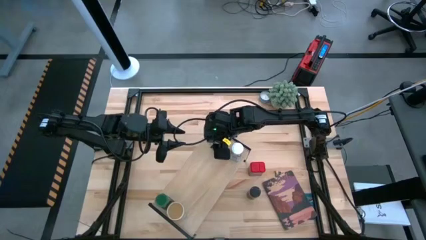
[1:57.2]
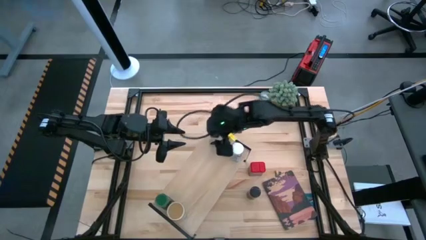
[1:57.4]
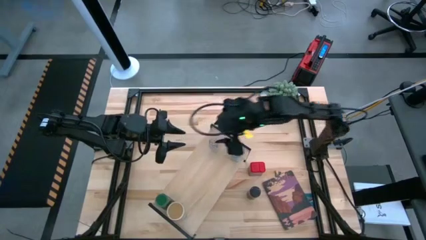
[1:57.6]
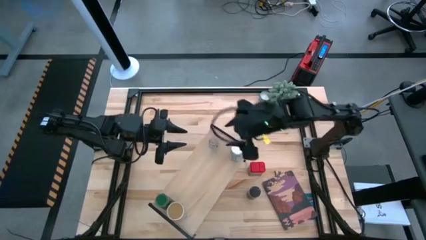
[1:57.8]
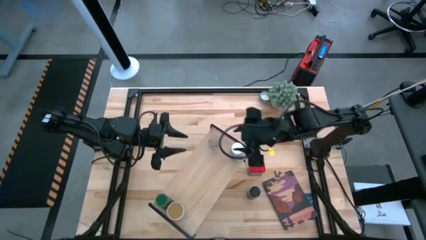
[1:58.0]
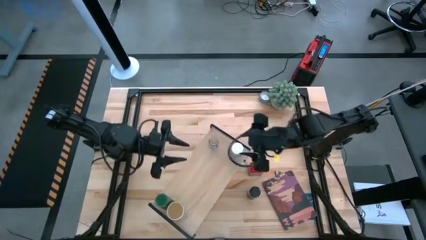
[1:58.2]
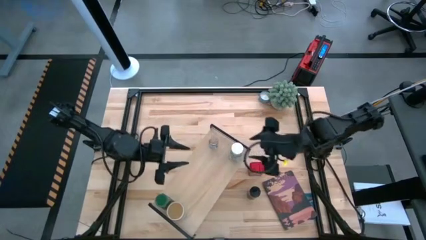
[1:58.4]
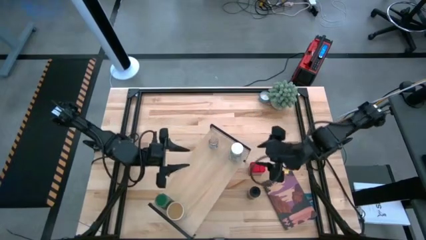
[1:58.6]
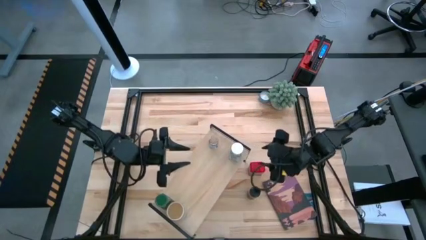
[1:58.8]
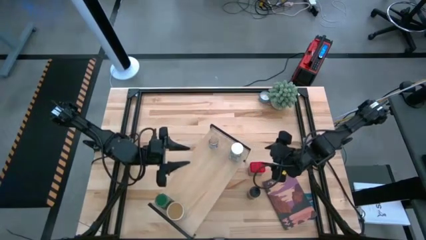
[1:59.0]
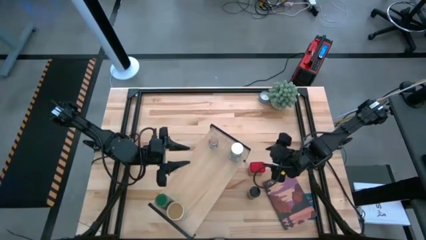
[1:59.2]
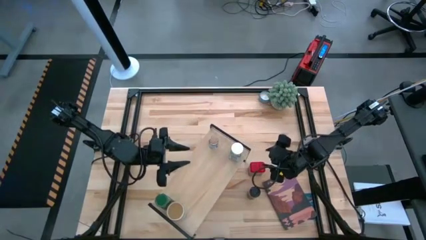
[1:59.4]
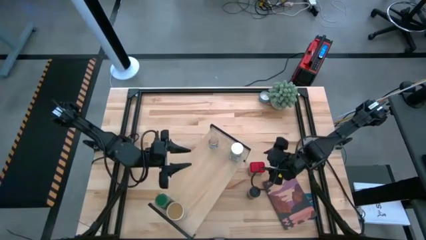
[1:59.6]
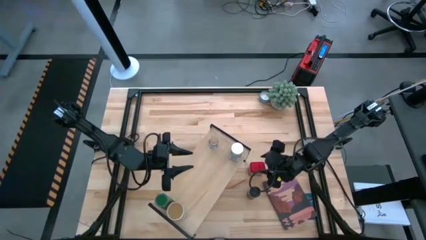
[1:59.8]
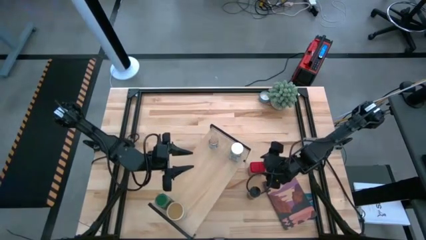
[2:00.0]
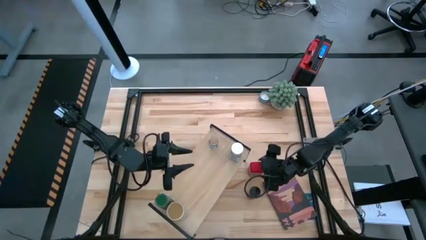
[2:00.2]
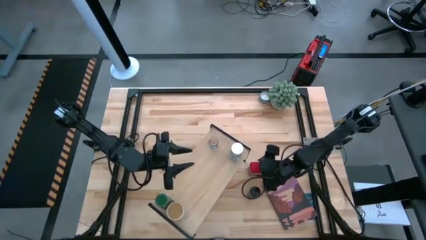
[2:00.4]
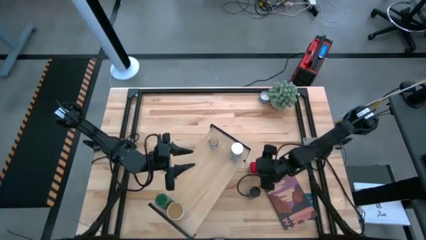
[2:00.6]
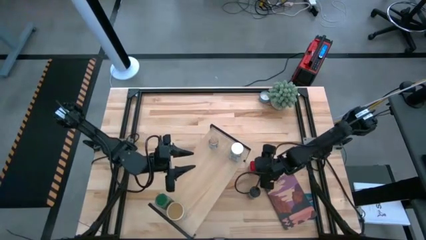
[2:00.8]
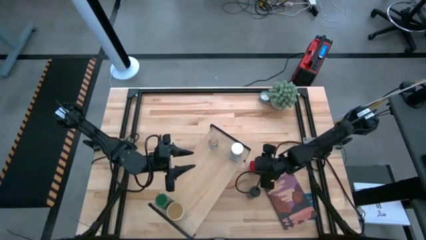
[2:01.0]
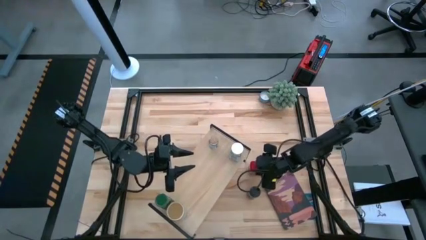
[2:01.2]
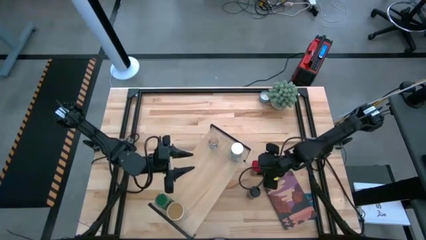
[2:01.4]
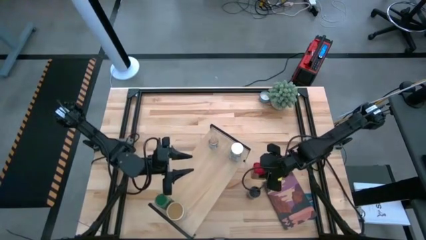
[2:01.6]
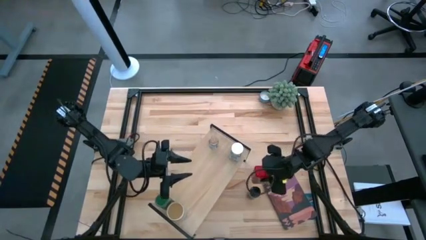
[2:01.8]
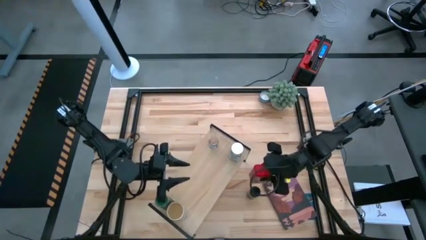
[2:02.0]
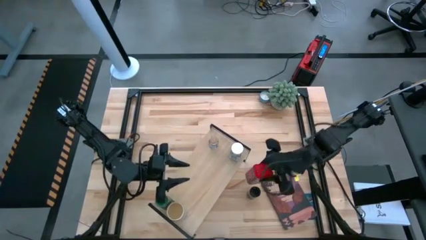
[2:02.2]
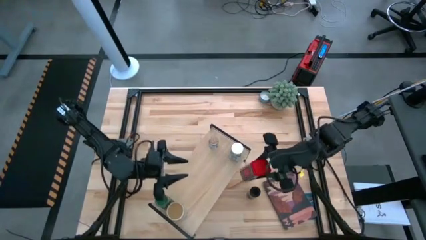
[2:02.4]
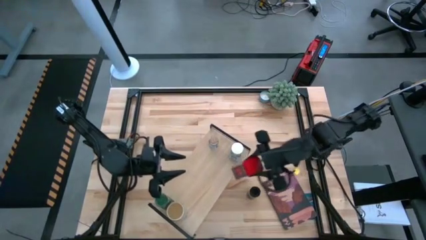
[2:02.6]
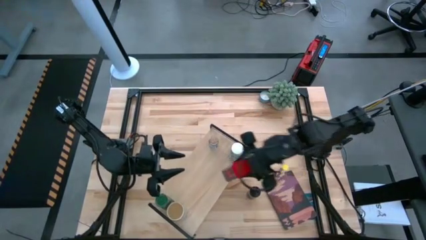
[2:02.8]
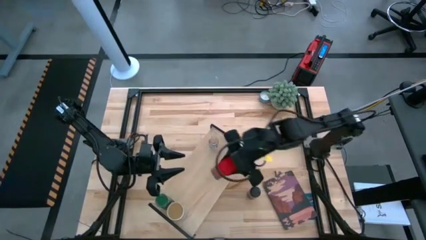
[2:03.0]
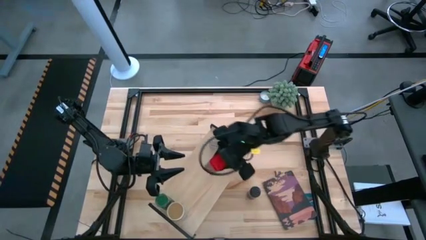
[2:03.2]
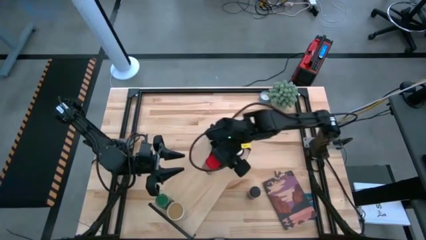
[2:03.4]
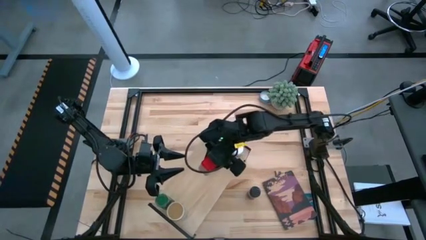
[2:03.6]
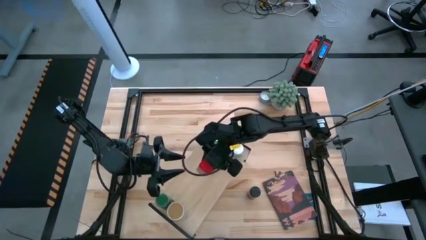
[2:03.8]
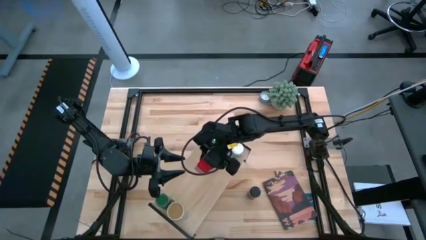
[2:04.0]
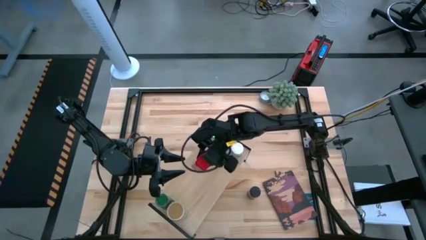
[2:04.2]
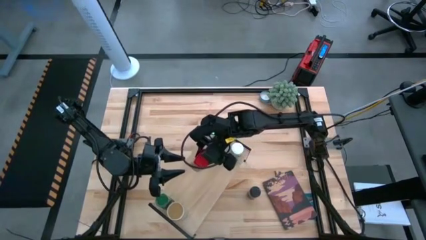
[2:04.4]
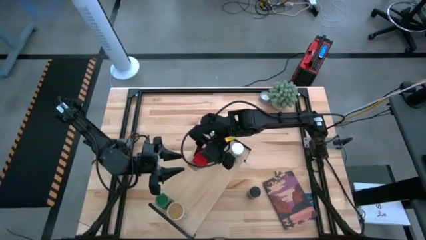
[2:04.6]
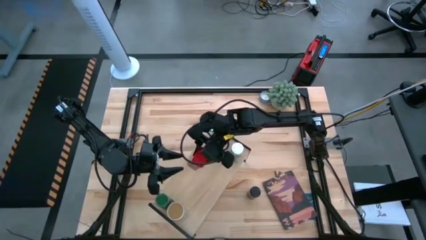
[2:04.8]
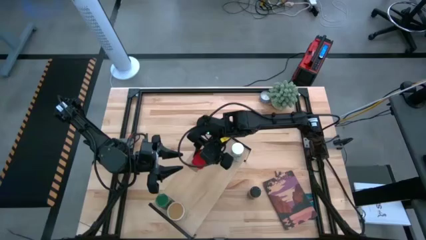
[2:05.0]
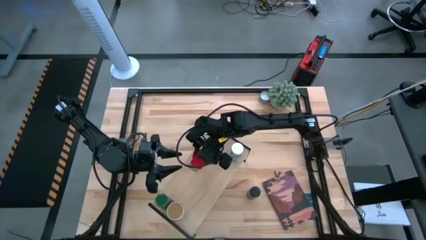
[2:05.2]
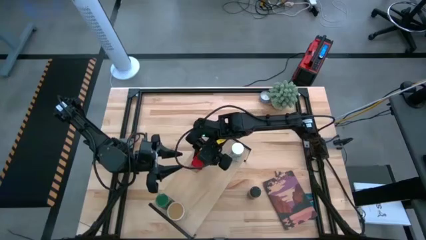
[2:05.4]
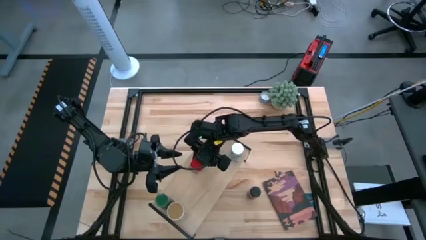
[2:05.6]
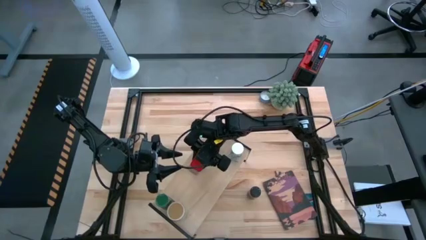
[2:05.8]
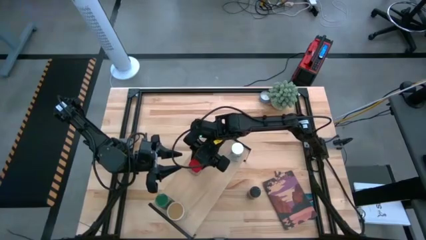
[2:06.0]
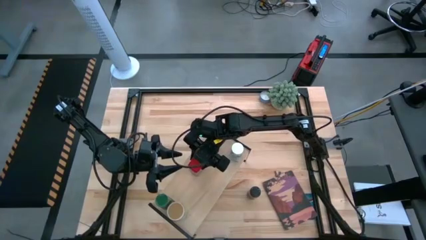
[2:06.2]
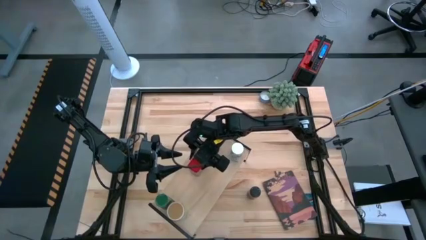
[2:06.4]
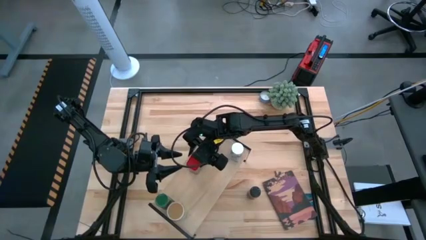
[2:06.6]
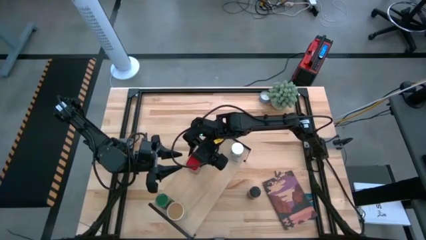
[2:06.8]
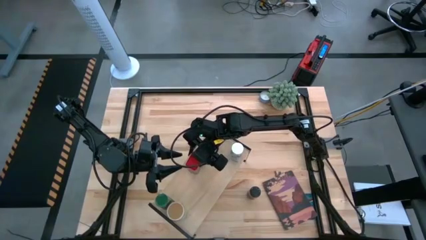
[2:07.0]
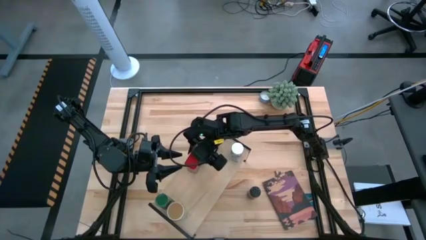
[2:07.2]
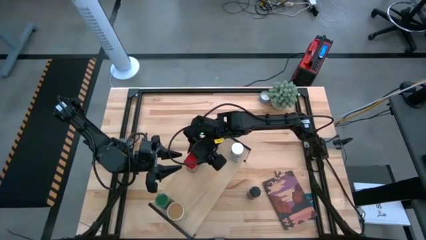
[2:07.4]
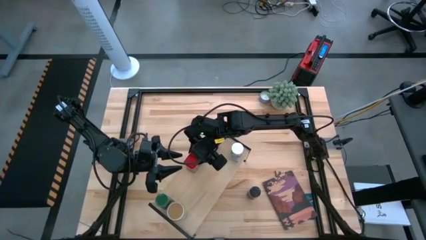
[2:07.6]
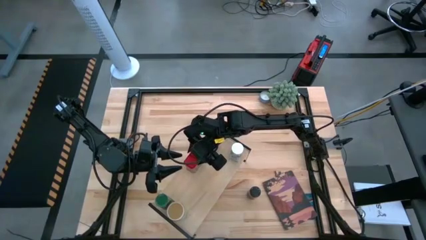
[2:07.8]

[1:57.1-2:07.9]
Task: Shelf spices
Put the red seasoning can on the shelf

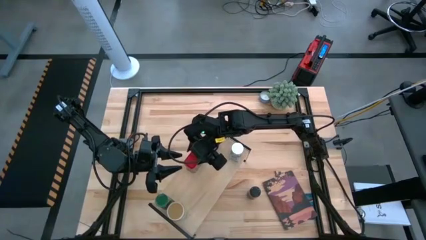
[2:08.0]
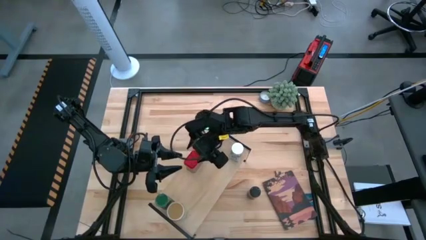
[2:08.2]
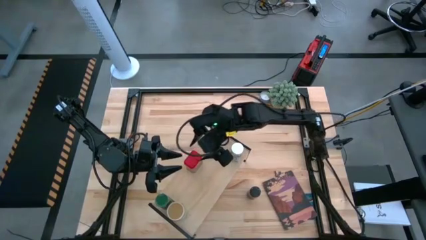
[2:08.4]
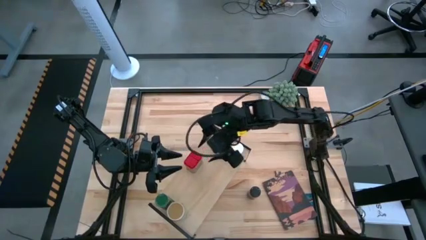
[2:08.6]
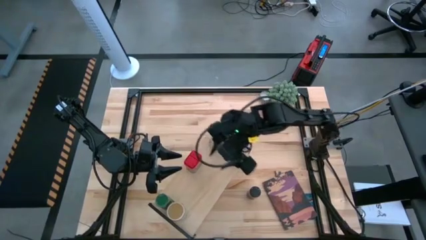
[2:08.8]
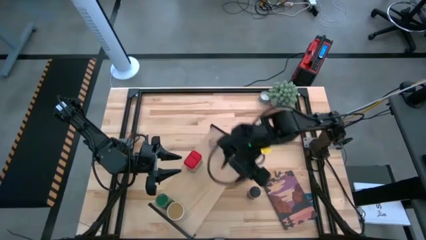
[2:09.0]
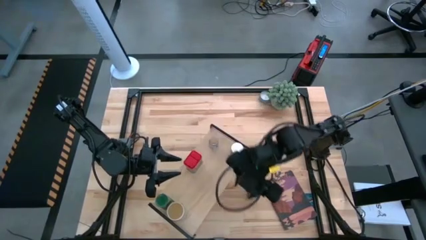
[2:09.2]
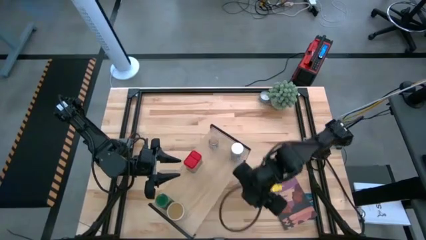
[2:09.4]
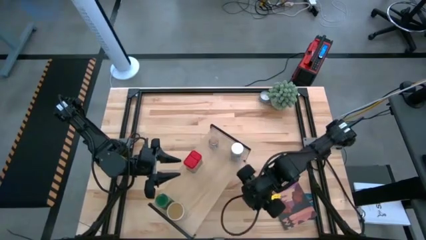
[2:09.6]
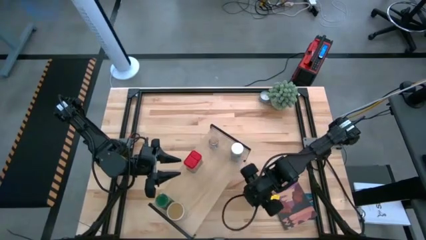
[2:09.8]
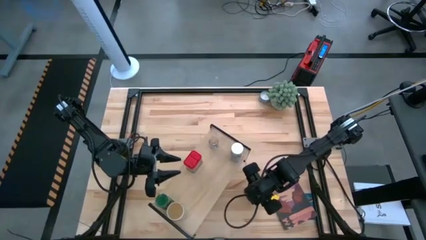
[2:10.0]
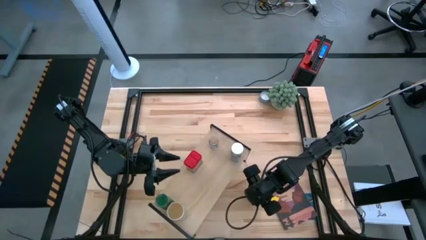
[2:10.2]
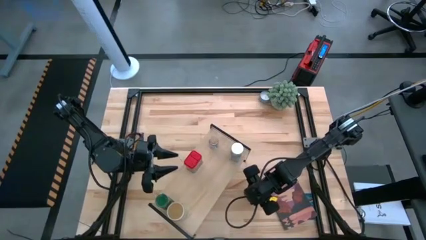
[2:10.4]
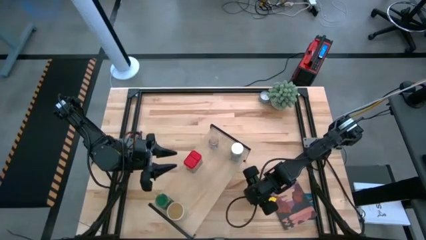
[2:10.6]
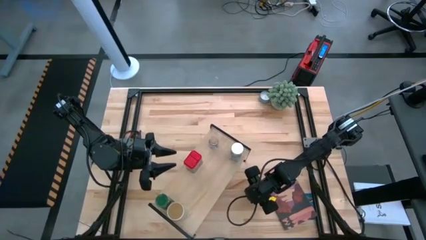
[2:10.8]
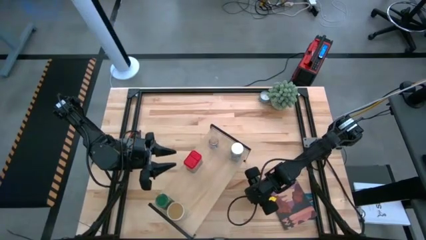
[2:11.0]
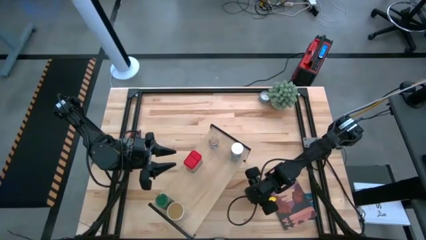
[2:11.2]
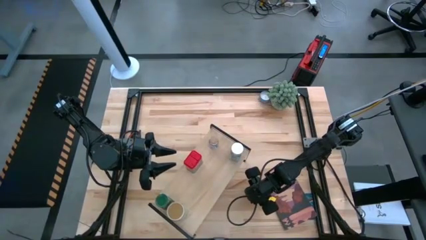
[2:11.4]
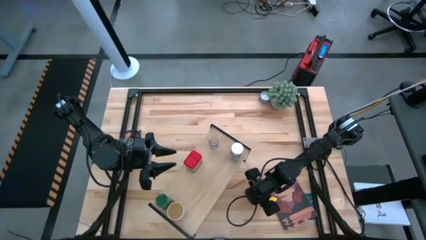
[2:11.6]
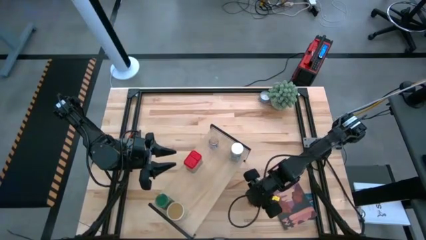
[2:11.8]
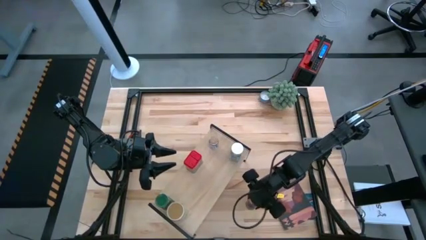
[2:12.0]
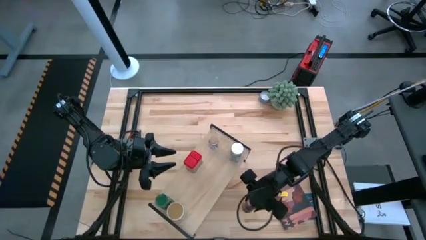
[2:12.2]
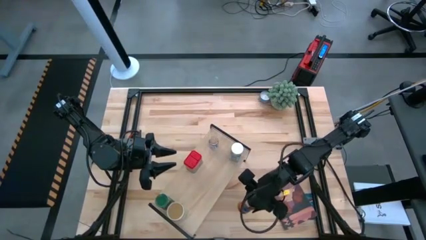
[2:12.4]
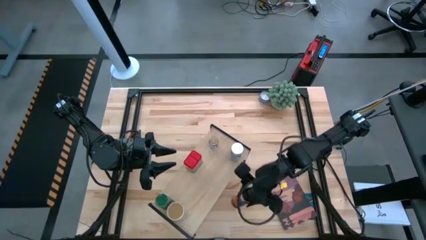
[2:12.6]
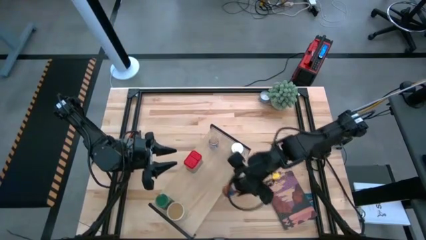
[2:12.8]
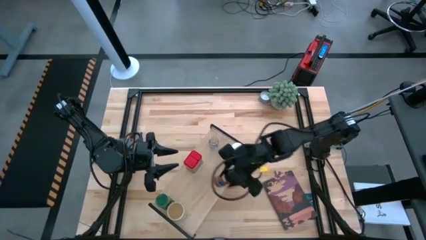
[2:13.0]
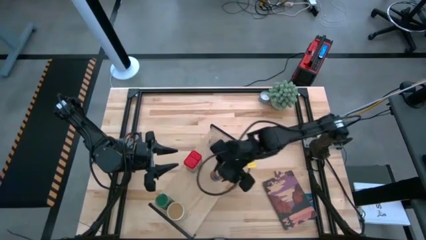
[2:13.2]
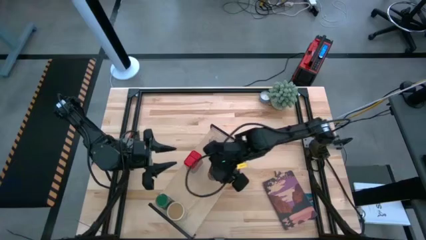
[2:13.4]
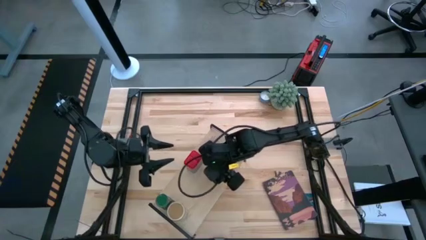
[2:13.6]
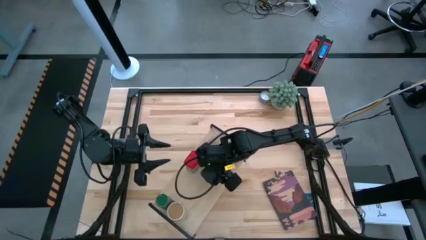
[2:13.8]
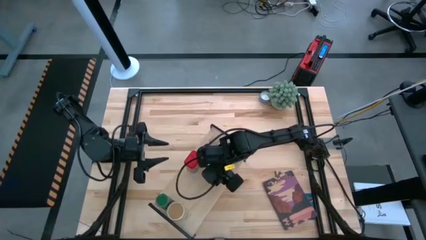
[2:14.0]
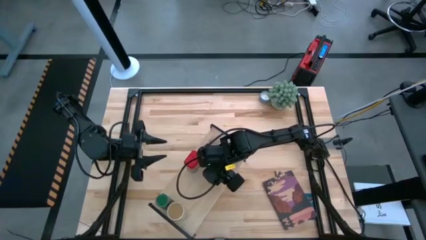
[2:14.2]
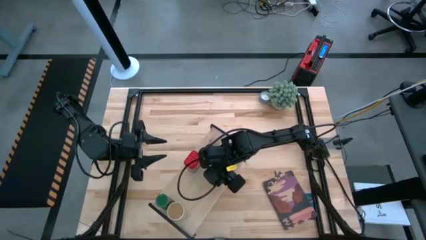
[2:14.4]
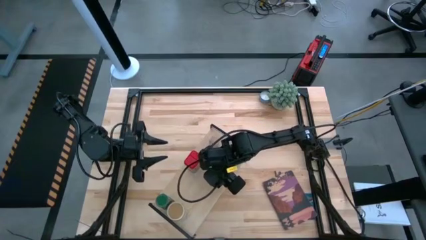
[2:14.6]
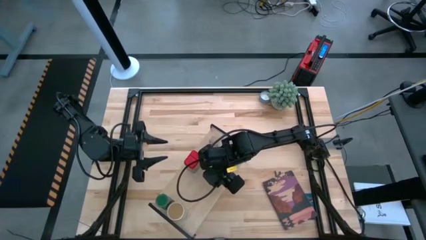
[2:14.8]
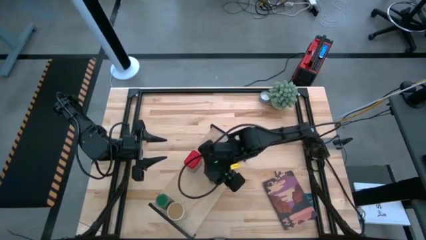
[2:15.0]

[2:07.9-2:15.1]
Put the black seasoning bottle on the shelf
